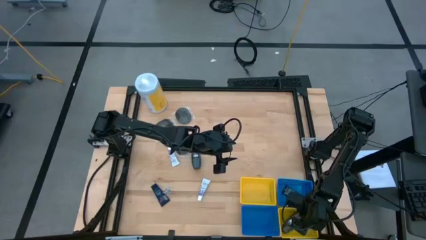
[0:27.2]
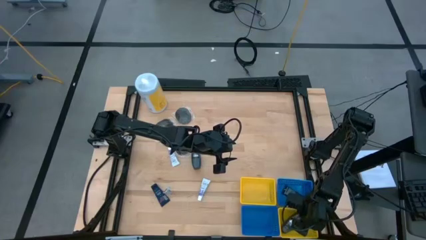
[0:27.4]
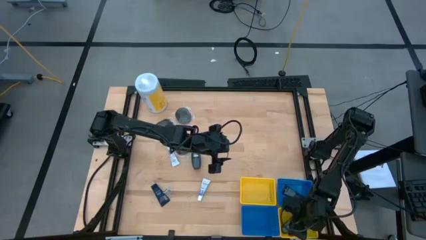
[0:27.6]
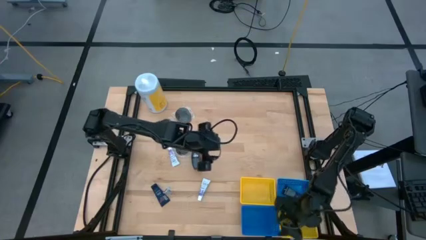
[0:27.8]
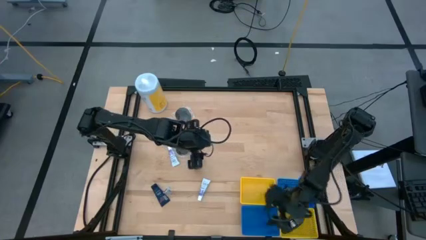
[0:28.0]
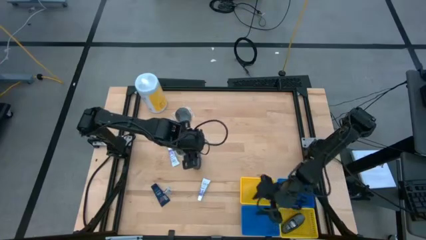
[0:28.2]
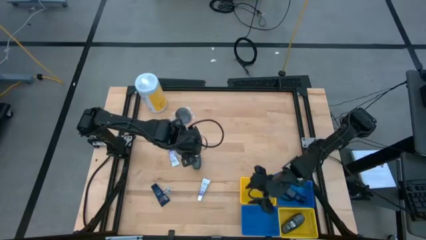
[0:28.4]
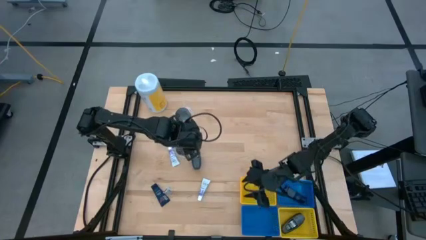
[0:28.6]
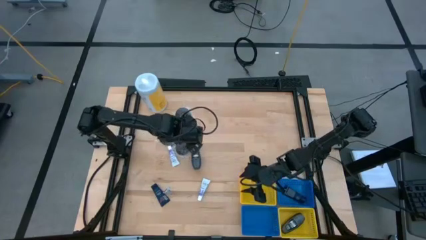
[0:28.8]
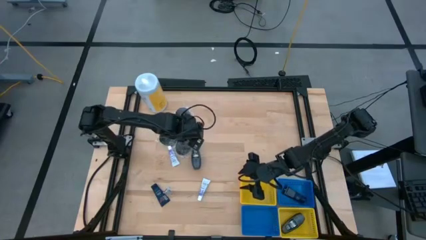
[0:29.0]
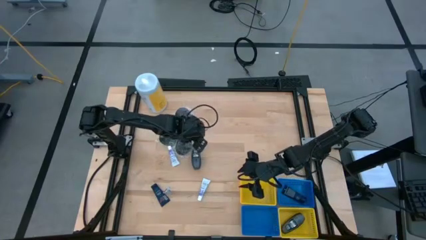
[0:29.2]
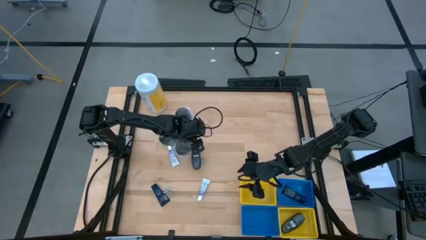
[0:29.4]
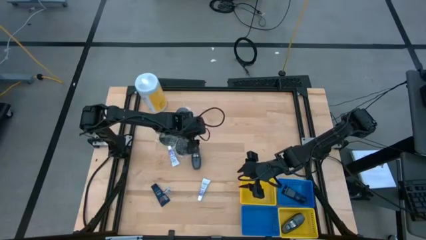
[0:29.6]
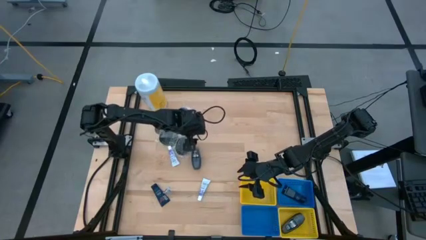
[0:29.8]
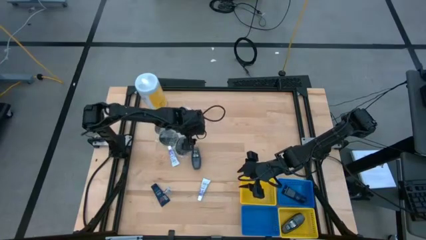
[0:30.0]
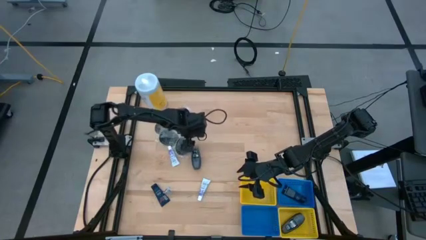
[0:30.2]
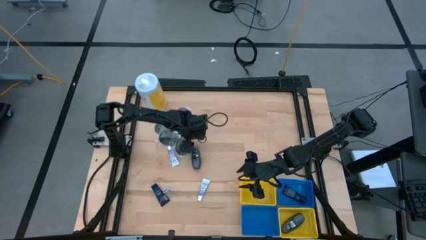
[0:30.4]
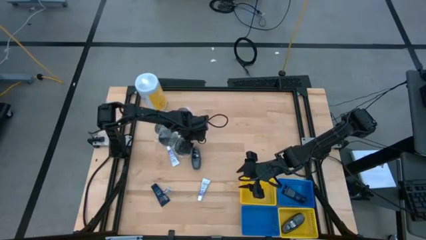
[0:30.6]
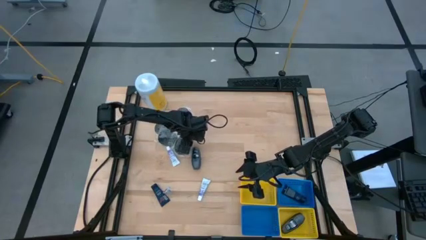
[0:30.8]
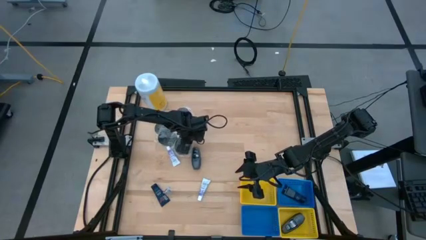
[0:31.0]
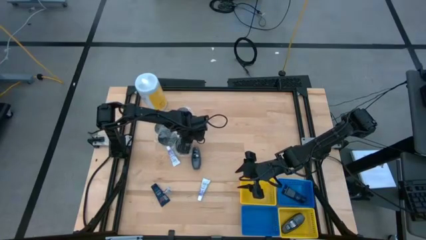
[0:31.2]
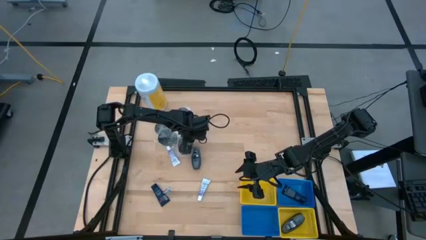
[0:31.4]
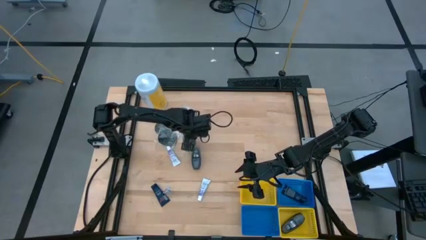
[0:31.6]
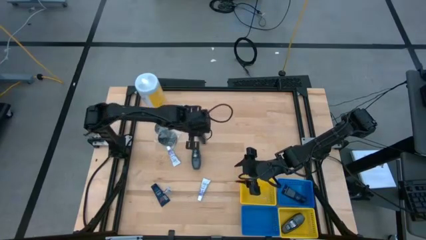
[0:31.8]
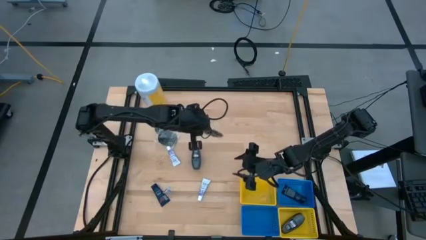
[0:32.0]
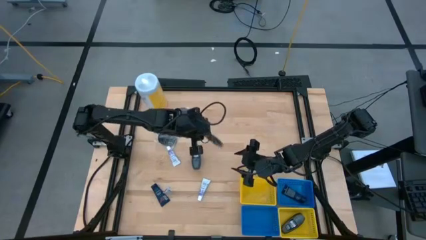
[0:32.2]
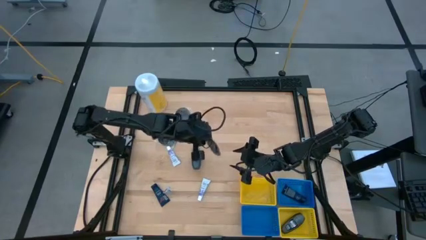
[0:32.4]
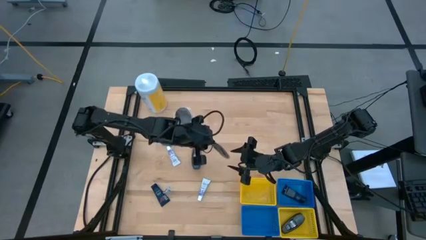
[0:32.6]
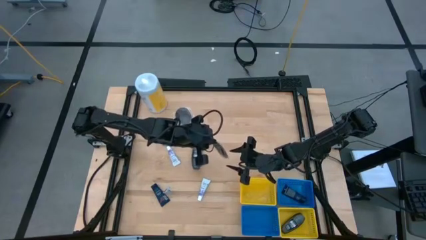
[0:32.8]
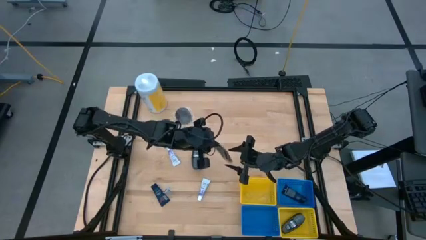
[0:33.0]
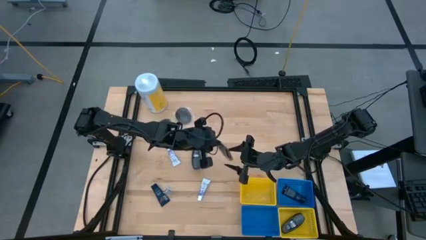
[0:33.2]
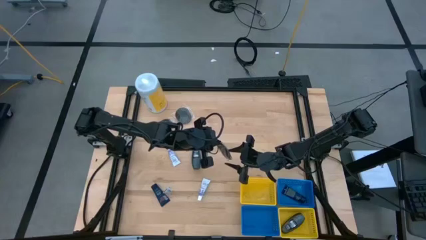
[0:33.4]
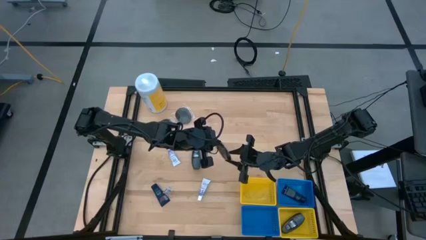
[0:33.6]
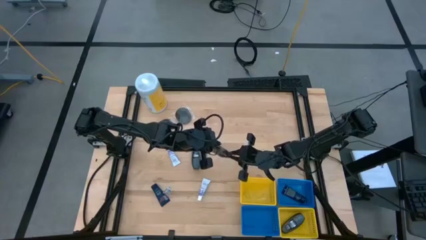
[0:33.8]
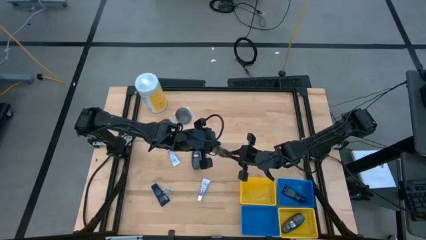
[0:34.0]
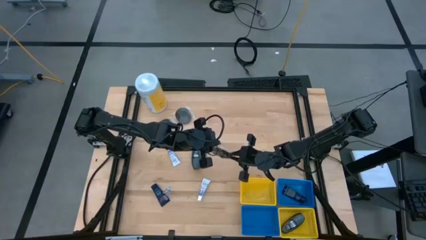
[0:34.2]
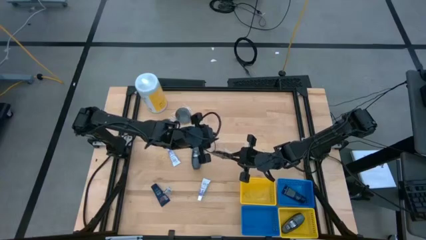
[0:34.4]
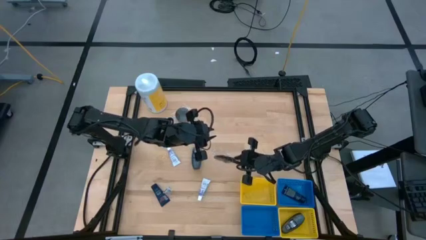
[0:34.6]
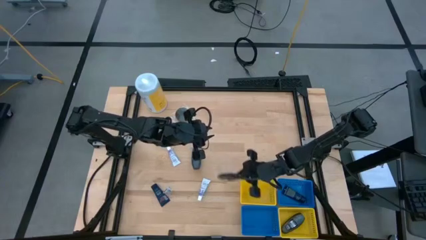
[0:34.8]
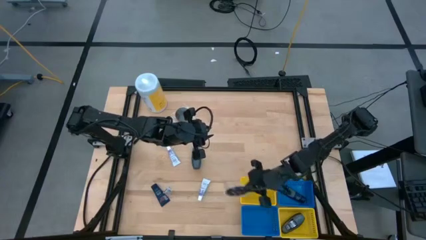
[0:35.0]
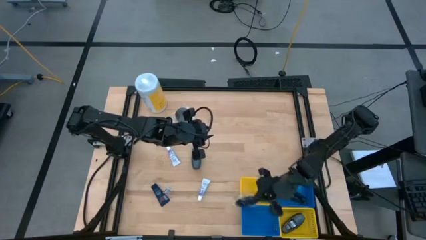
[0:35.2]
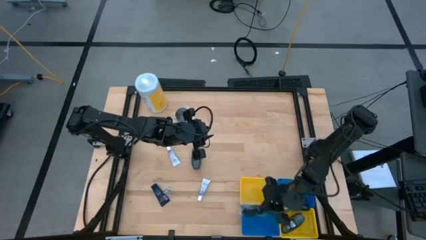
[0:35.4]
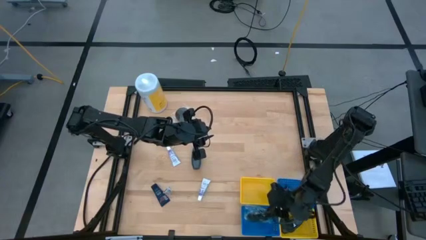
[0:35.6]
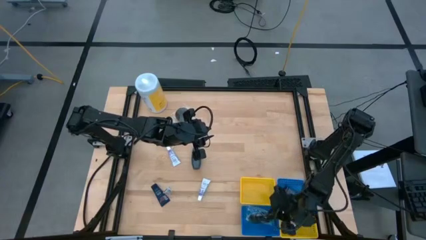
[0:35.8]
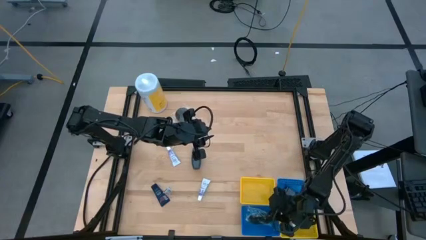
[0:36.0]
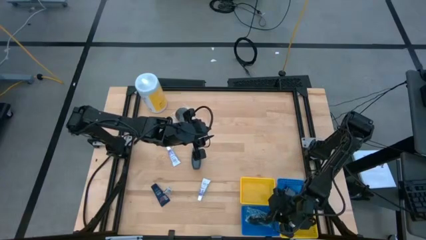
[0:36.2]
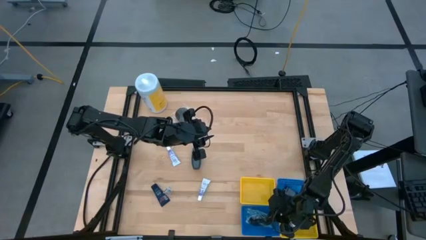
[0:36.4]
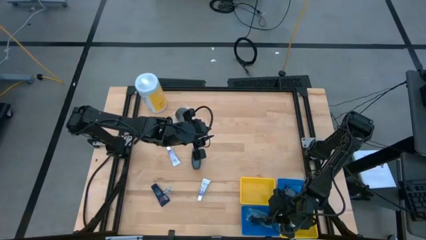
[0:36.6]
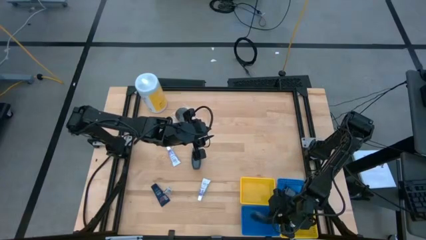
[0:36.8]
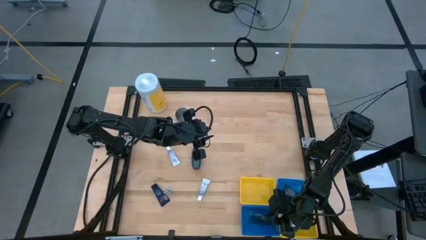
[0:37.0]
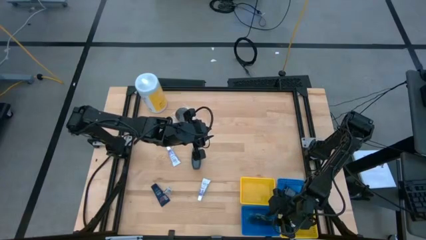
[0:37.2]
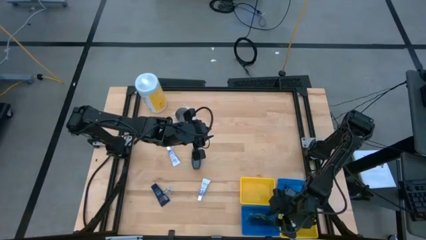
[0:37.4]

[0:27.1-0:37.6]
Task: Pick & Place Travel size toiletries
Put the black hairbrush into the bottom blue bin

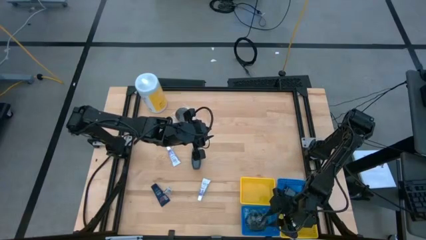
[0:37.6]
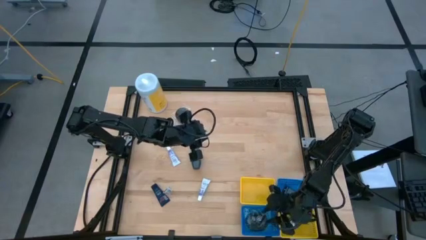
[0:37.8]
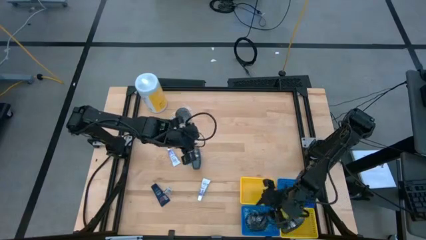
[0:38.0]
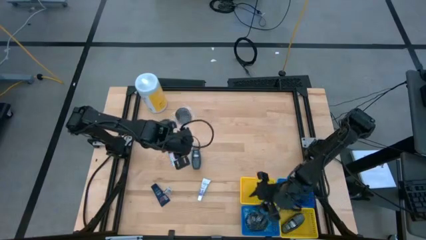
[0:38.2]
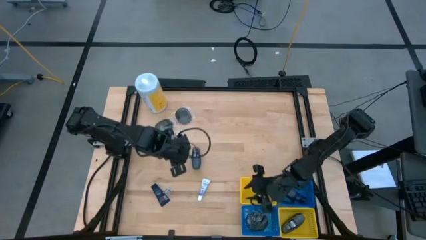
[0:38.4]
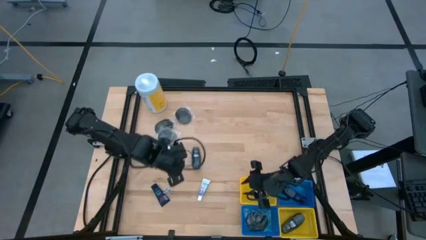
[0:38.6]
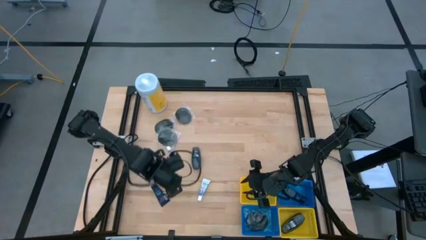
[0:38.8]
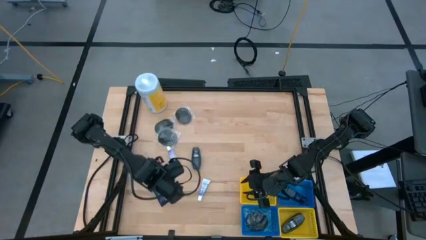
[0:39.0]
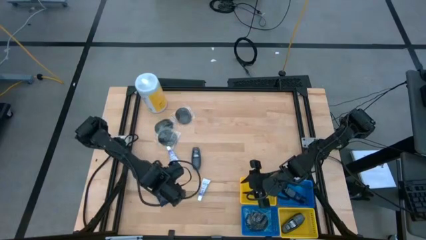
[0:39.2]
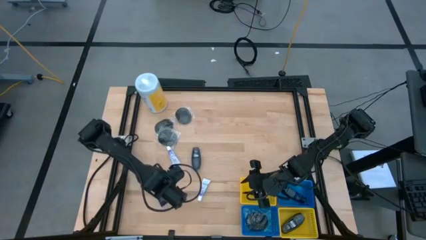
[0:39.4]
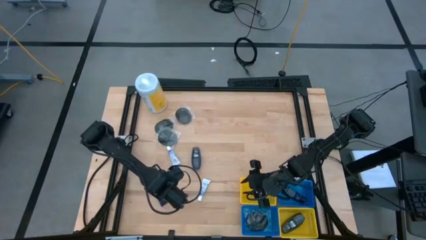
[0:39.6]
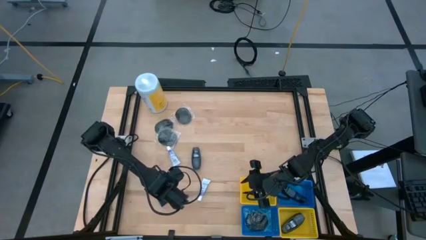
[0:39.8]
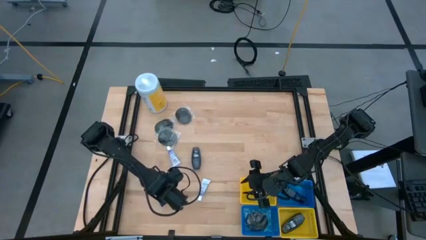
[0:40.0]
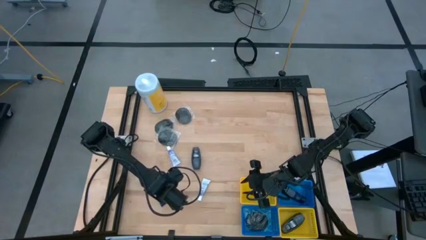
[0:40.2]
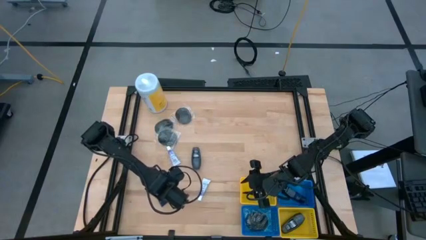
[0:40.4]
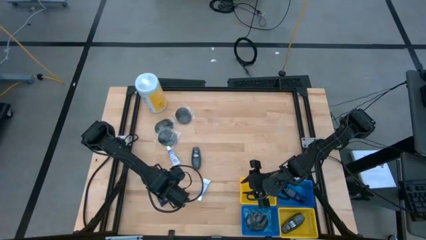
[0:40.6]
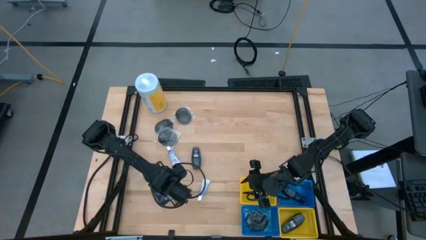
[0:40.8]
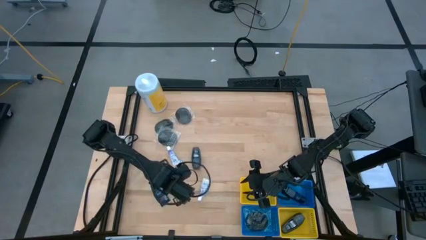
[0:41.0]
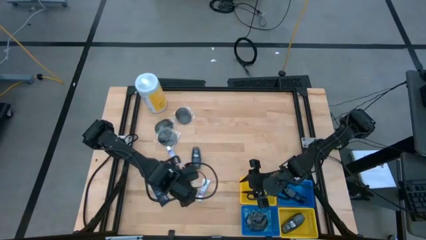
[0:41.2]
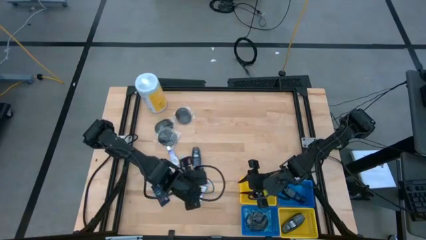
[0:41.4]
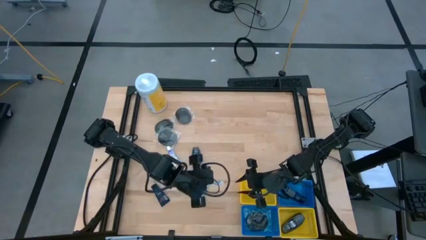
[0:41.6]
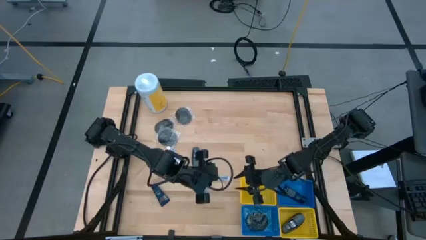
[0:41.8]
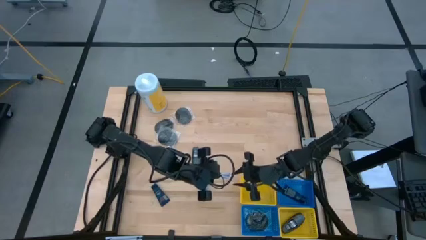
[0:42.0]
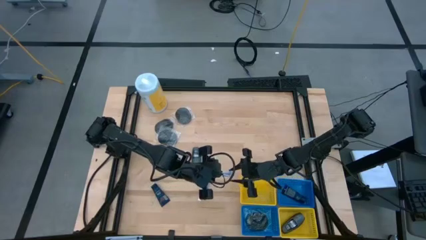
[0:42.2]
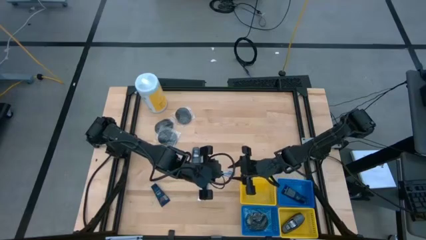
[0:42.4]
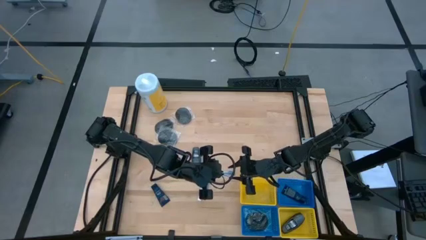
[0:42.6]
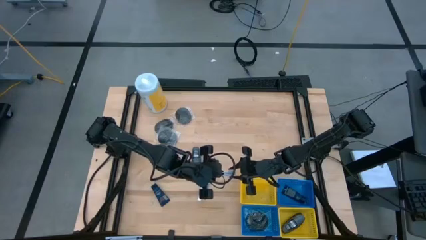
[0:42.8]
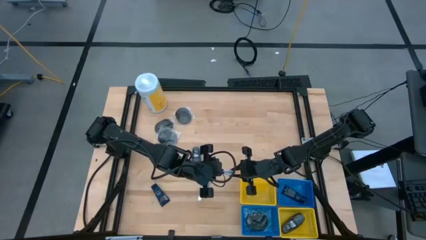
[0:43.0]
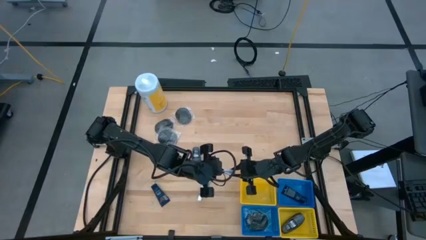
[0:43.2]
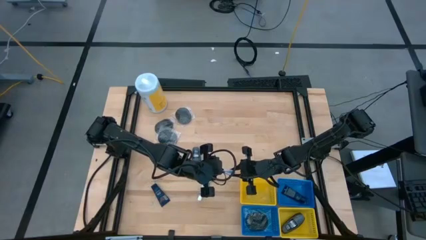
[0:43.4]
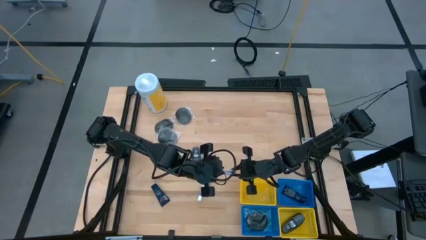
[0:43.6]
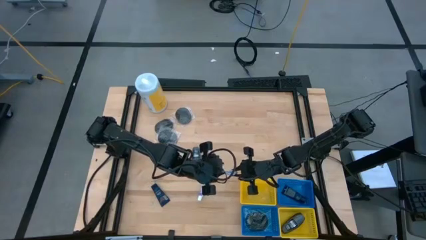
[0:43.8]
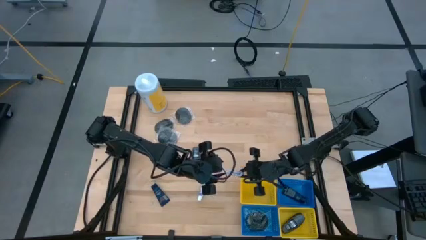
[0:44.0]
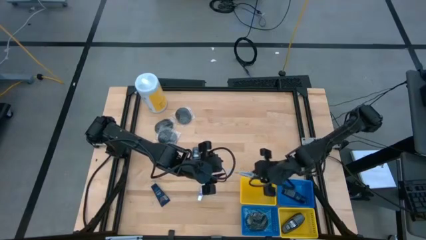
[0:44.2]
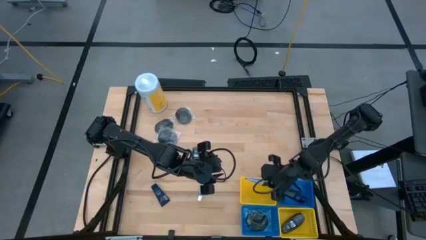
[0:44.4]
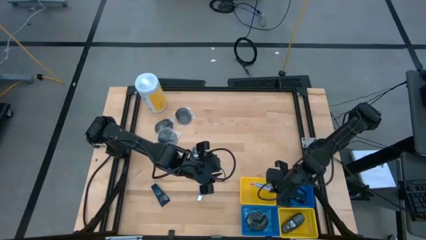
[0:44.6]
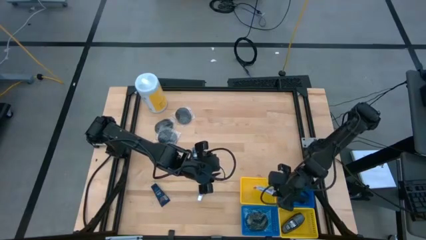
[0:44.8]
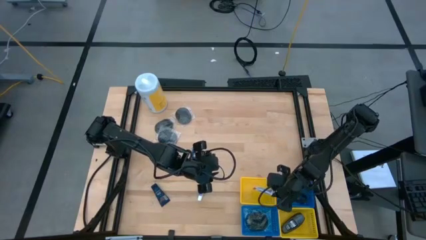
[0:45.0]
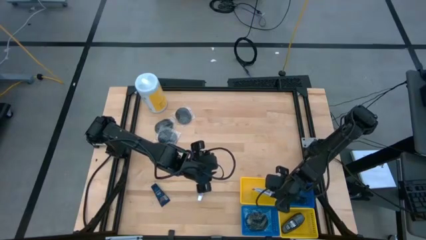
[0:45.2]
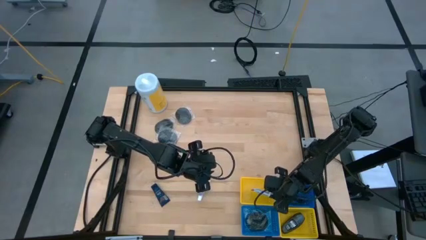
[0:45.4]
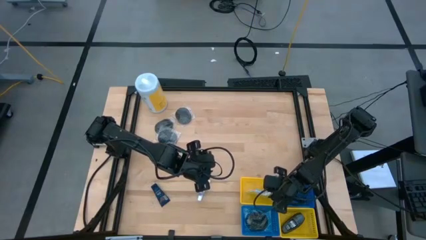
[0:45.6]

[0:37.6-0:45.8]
Put the white toothpaste into the top yellow bin
